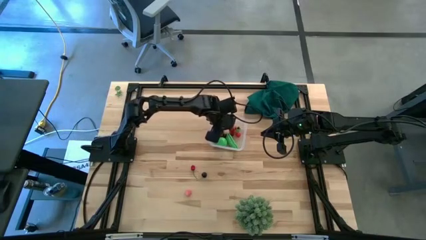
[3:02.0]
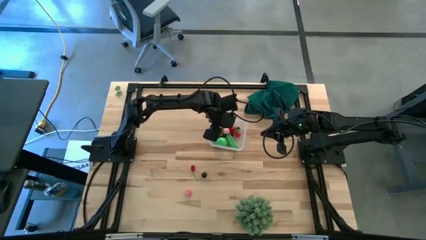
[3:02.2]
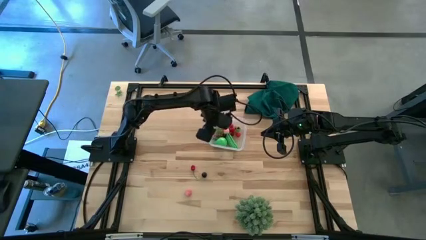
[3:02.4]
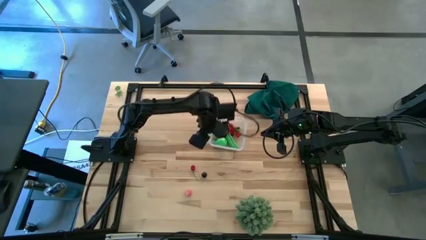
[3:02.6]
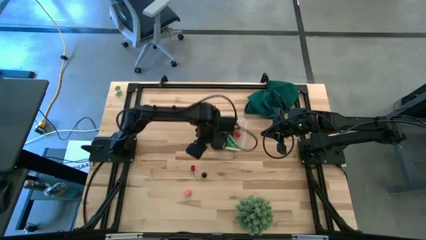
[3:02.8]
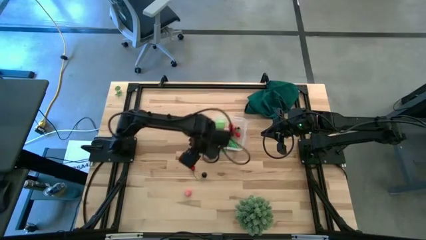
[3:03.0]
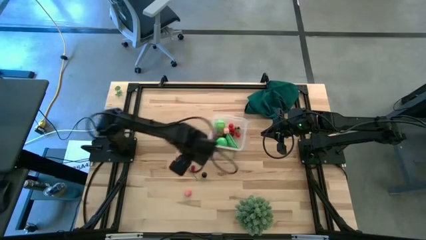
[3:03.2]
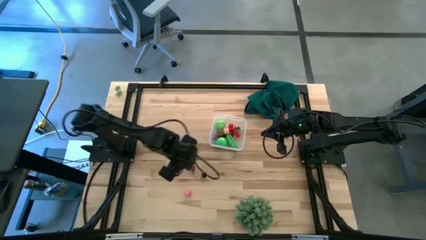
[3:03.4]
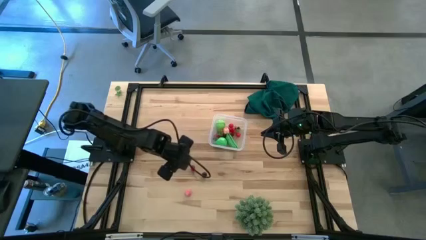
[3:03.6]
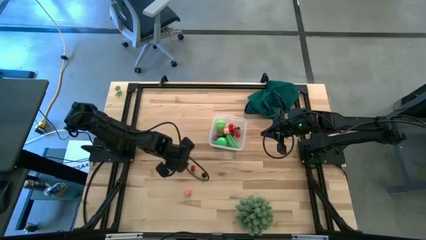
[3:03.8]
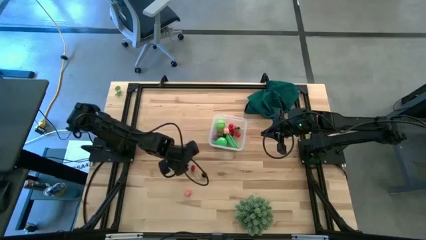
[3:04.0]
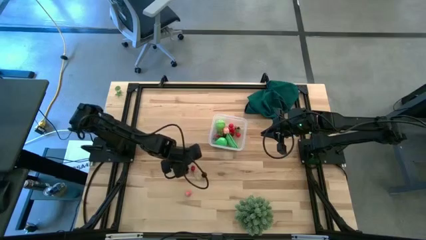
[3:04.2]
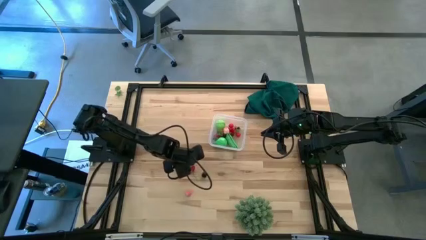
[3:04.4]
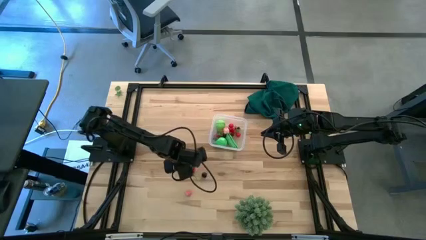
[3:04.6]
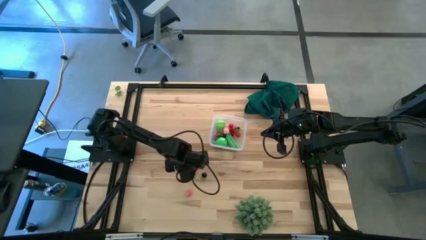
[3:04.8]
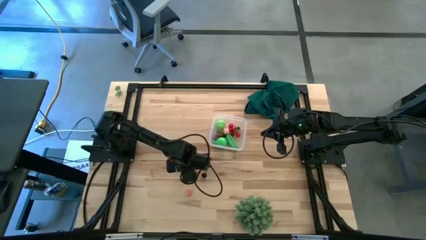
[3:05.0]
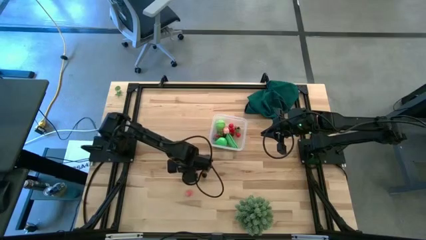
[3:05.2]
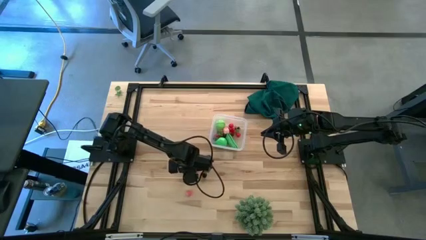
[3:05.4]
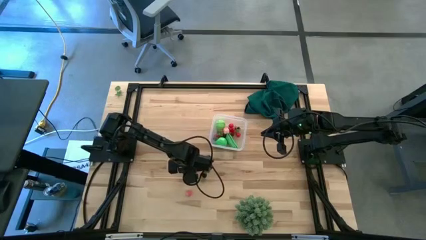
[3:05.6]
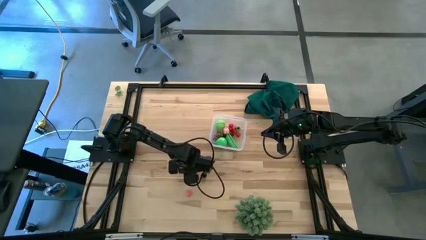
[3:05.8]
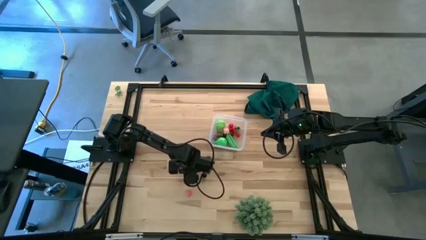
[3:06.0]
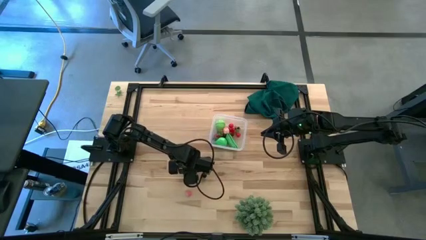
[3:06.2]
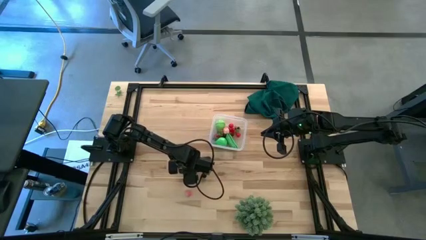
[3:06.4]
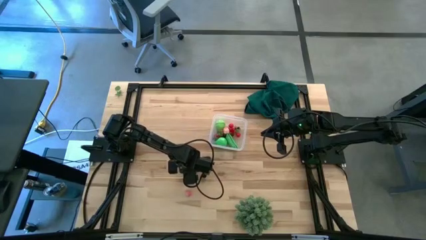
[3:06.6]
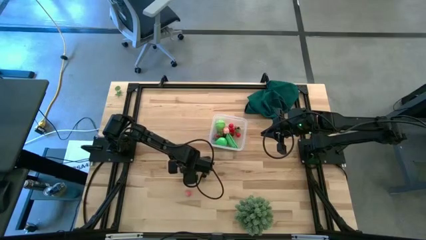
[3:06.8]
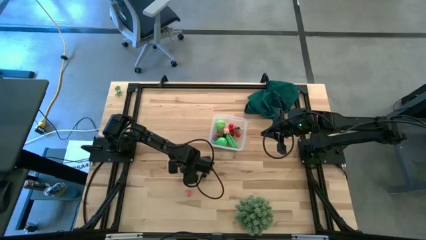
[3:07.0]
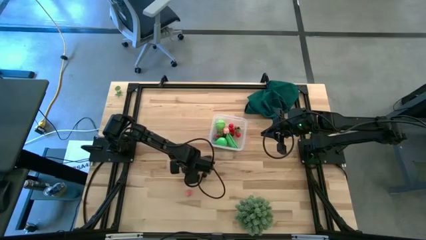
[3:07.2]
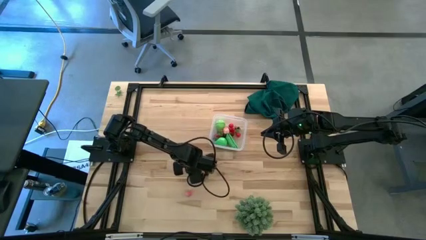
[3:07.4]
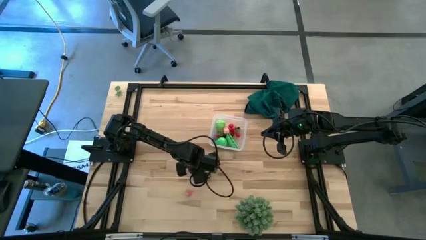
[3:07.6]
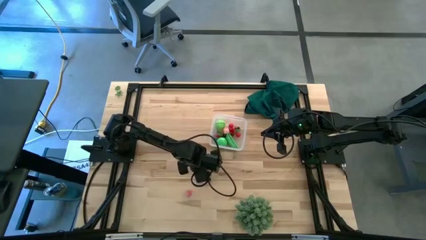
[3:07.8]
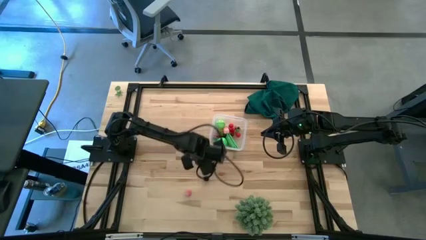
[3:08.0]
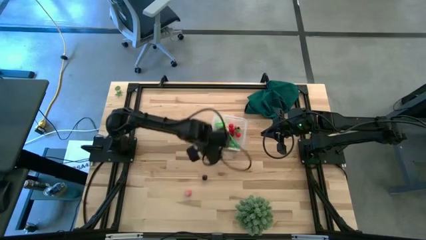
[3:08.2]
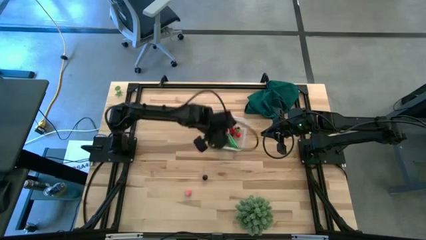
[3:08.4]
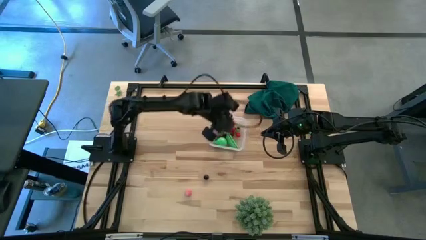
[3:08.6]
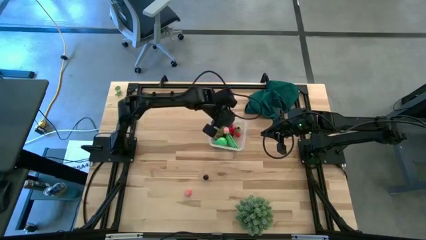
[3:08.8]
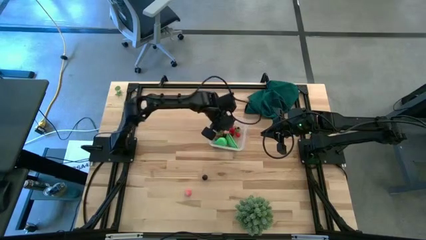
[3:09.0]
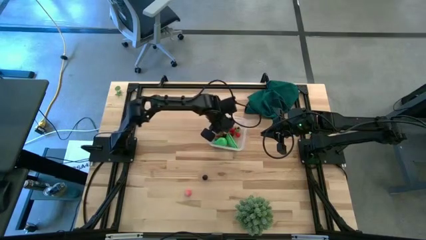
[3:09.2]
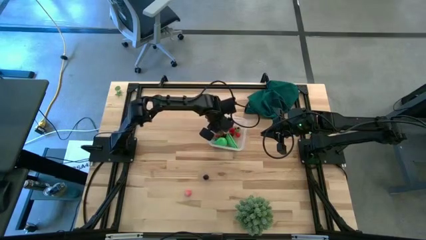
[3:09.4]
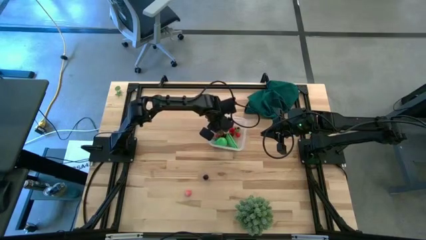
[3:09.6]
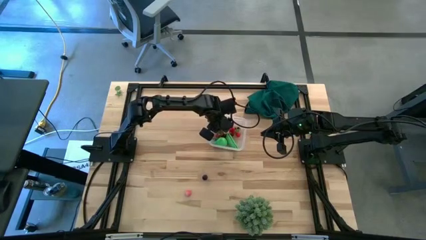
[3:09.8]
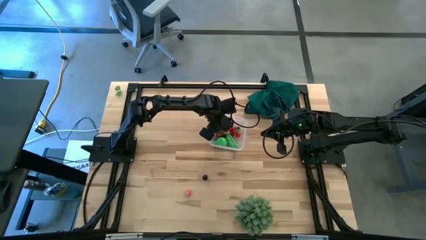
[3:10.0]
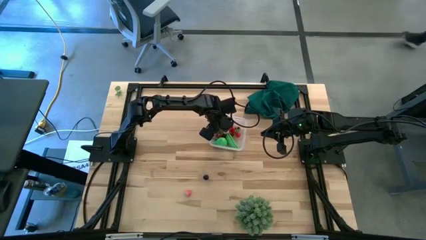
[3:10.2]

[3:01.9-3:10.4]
Task: Pick and placing Produce into tupperware
Put the red cherry into the transparent bin

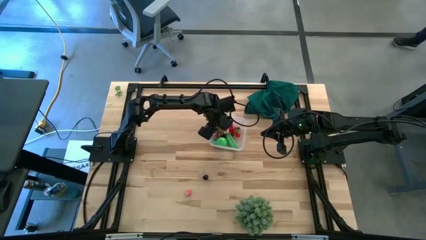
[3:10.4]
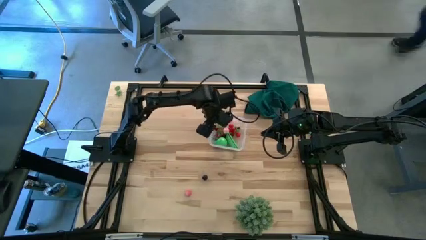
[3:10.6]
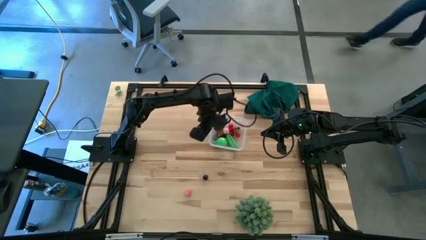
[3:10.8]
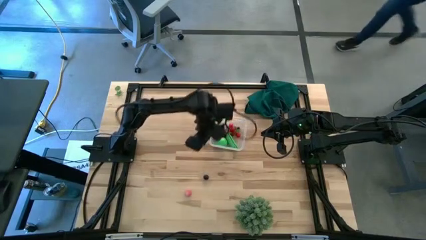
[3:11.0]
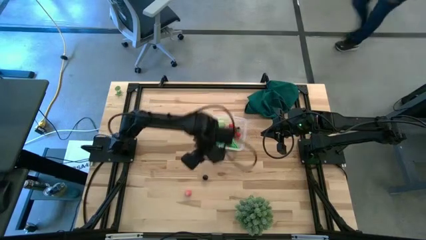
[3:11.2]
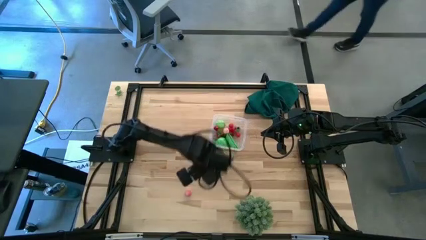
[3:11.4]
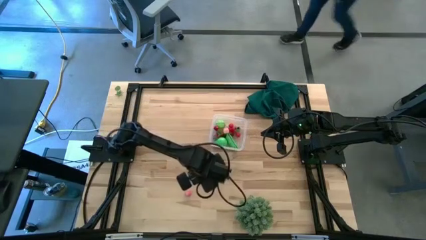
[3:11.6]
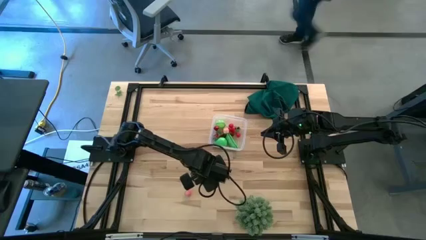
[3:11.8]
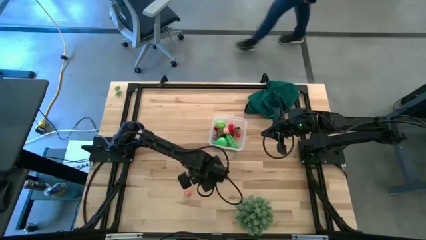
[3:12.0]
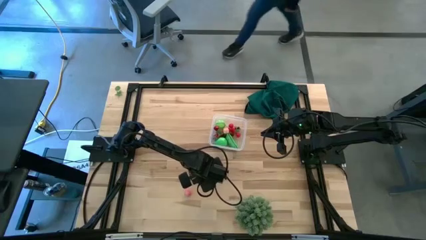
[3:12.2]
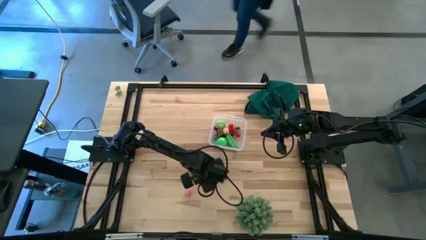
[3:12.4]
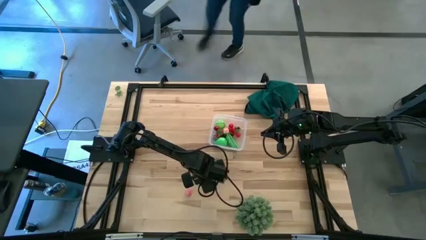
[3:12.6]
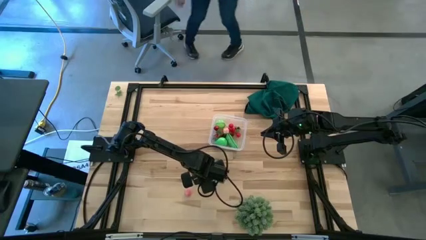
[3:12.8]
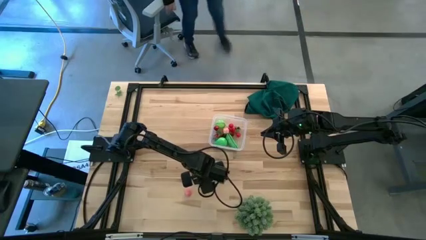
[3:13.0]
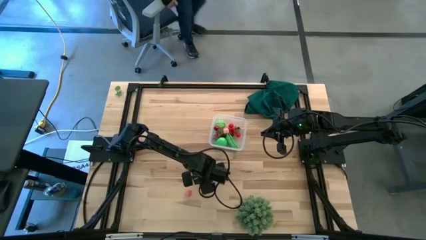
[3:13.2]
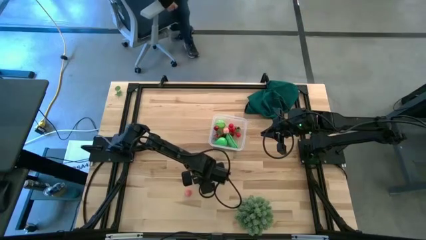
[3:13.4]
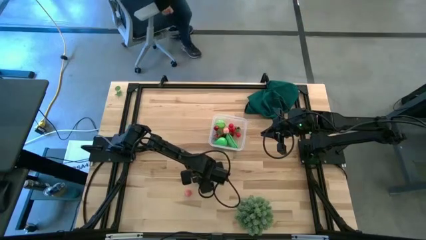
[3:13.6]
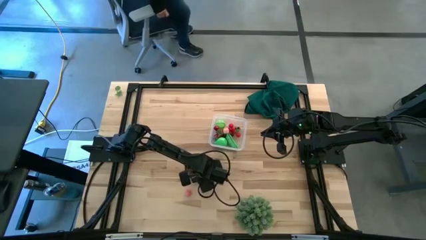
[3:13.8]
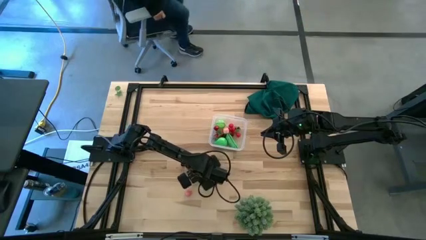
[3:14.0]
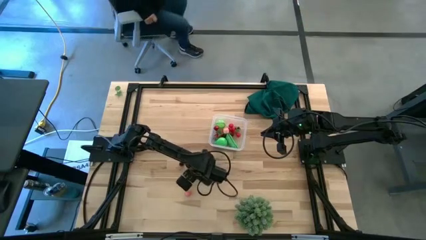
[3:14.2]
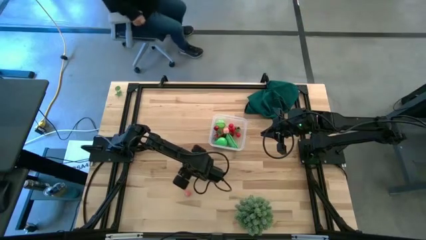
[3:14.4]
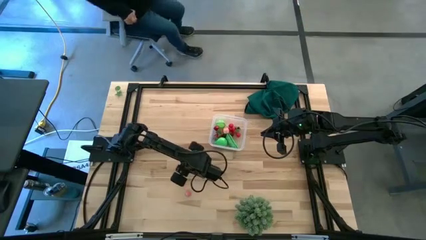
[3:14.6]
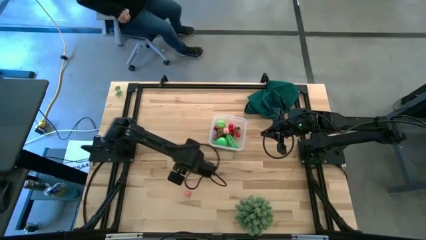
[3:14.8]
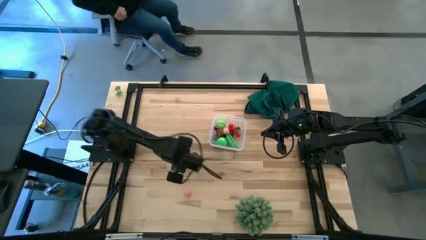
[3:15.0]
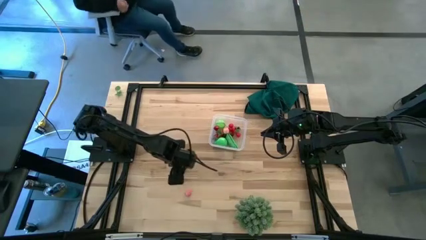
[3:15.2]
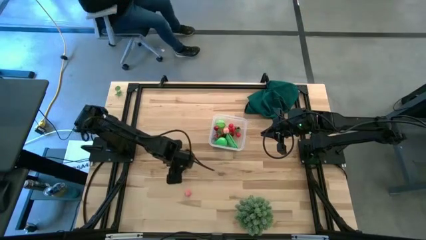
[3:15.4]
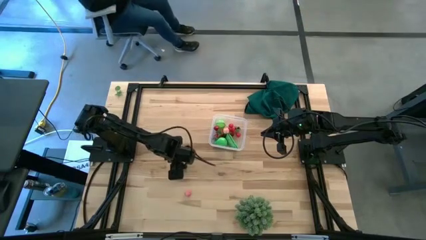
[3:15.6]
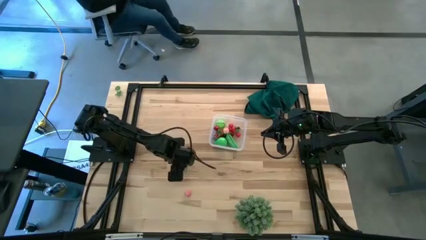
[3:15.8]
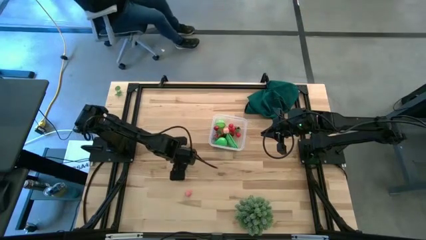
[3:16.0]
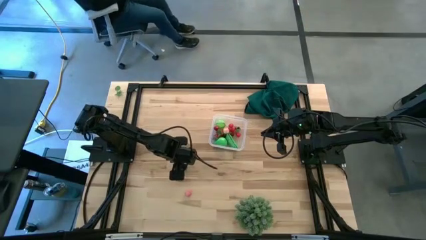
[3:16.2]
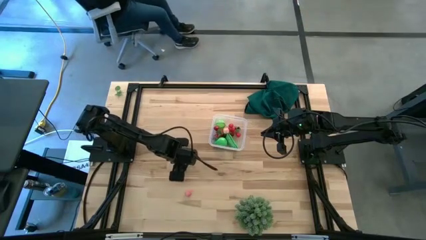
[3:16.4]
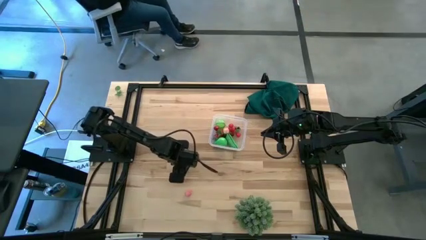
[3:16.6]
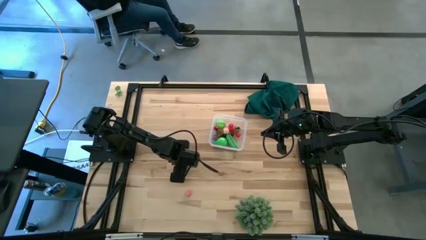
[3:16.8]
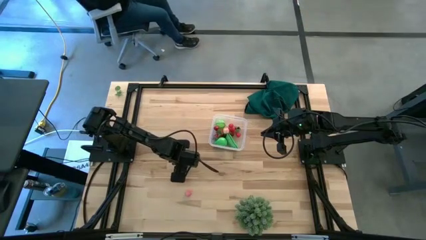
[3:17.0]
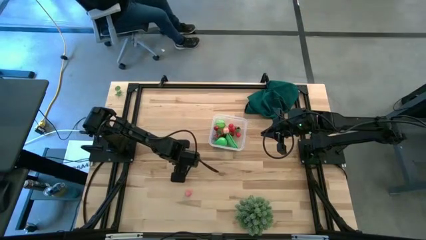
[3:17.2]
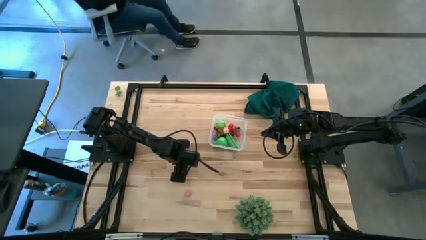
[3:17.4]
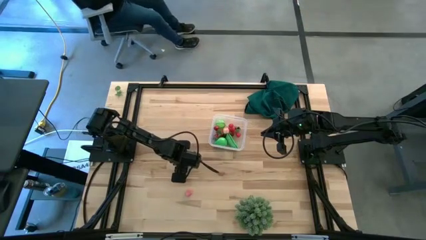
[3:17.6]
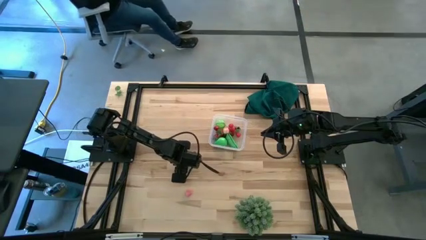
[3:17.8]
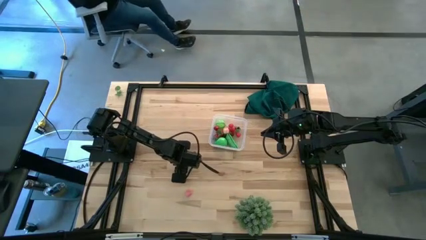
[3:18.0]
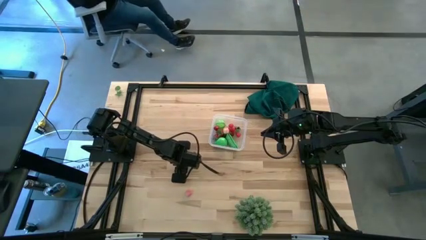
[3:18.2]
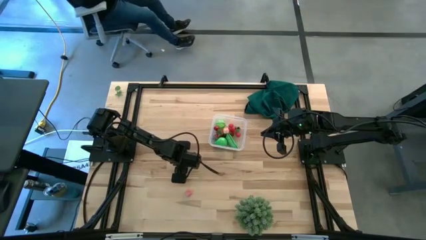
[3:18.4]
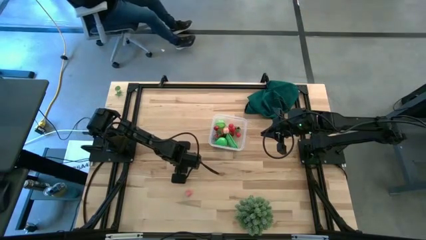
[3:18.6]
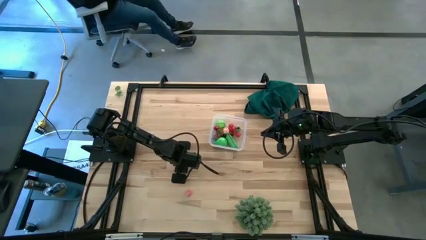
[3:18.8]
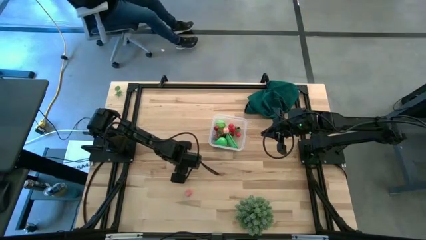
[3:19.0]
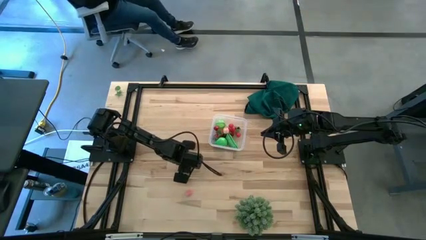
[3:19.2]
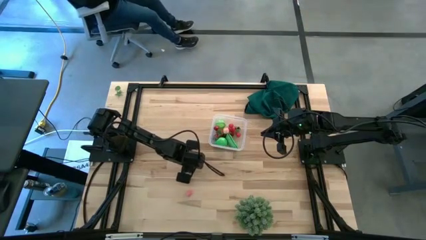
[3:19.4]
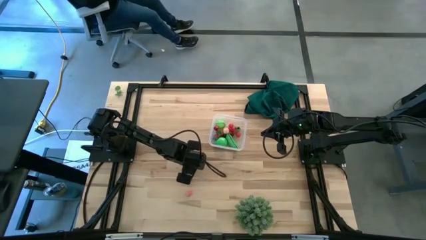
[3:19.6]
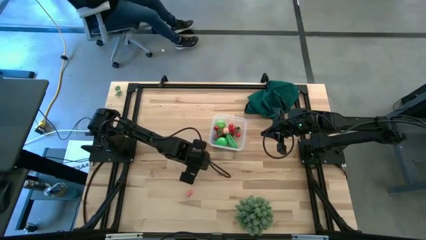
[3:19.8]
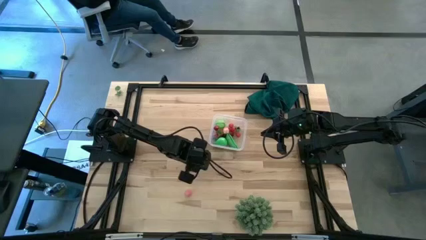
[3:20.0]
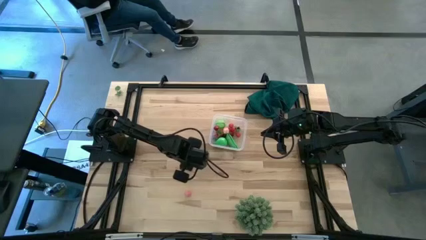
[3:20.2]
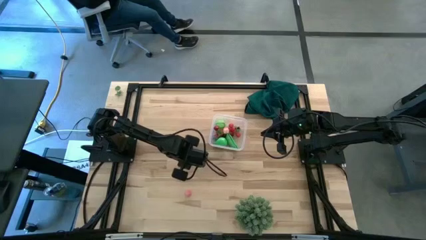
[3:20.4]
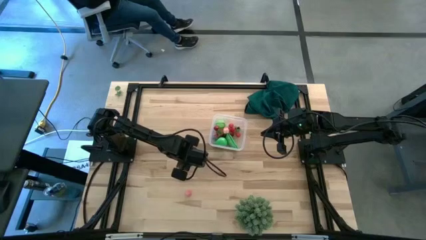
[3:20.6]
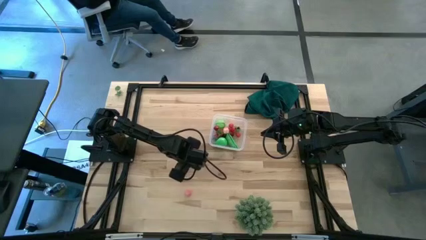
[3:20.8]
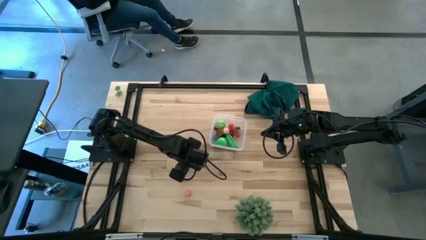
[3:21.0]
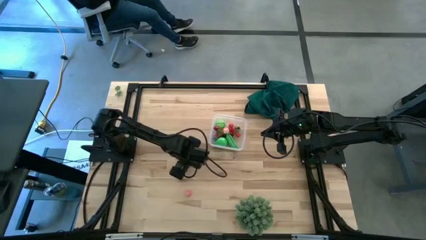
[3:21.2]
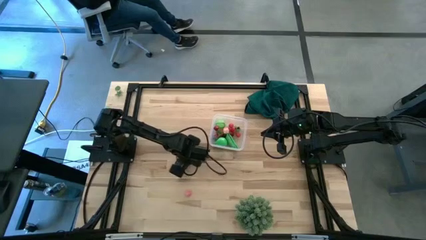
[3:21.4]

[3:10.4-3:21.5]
Put the black cherry into the transparent bin
